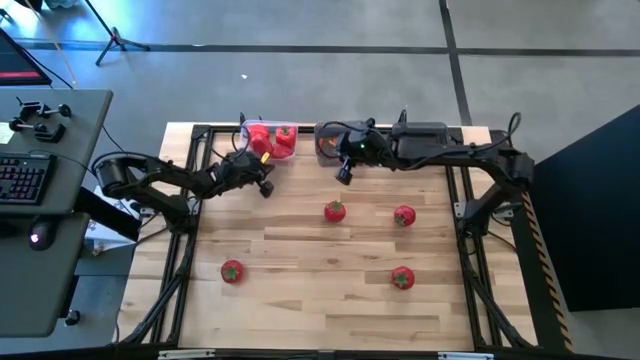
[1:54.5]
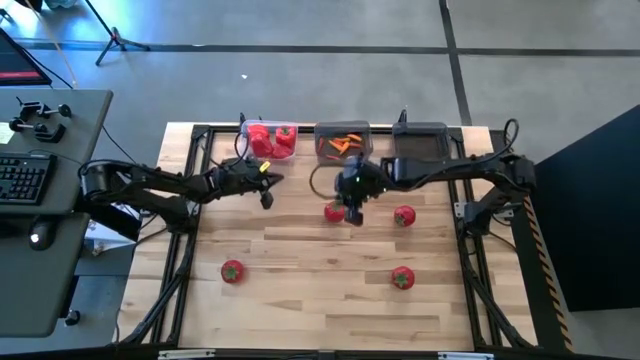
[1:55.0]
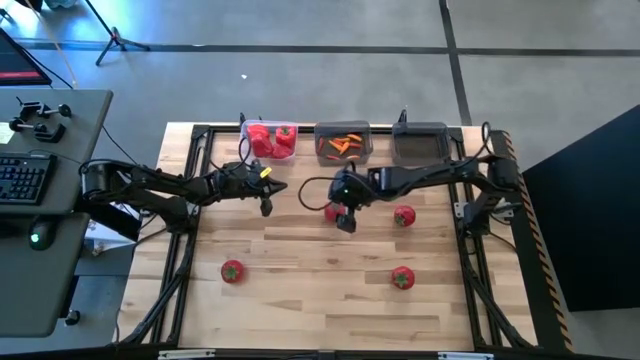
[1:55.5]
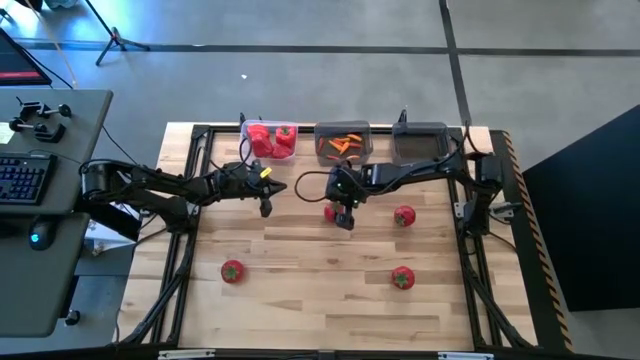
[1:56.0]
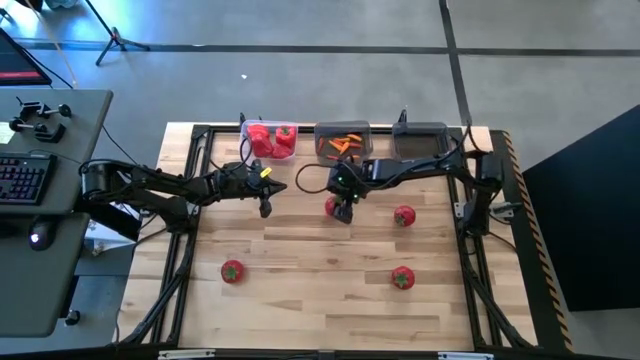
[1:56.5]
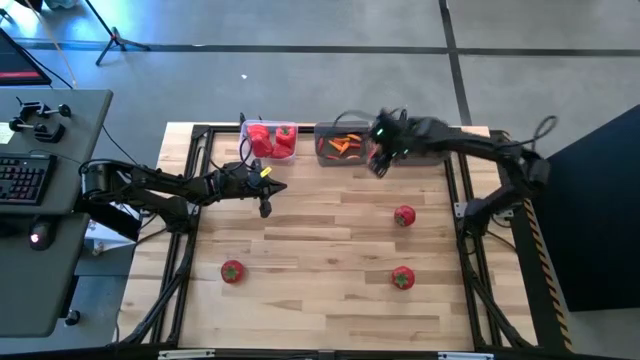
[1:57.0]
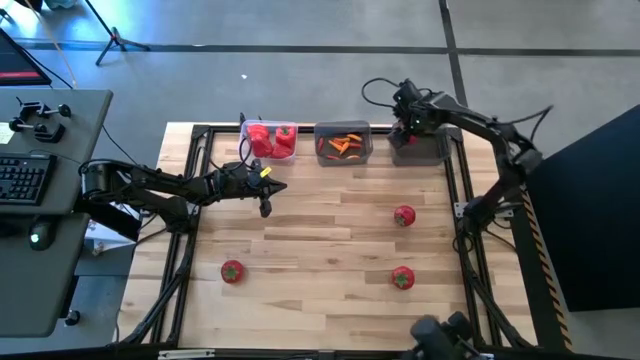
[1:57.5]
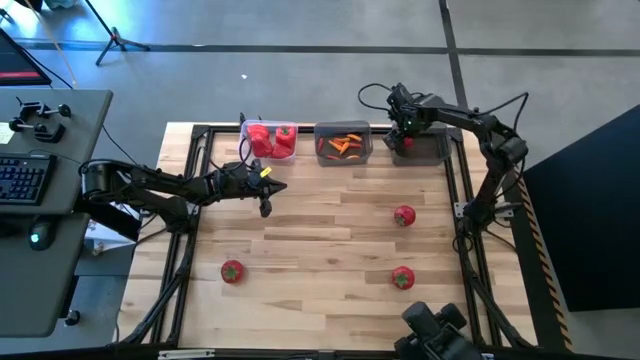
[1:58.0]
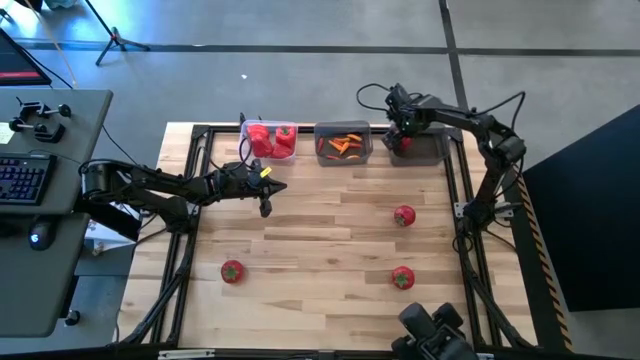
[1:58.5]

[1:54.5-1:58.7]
Task: Sort produce into baskets
Put the red tomato into the right black bin

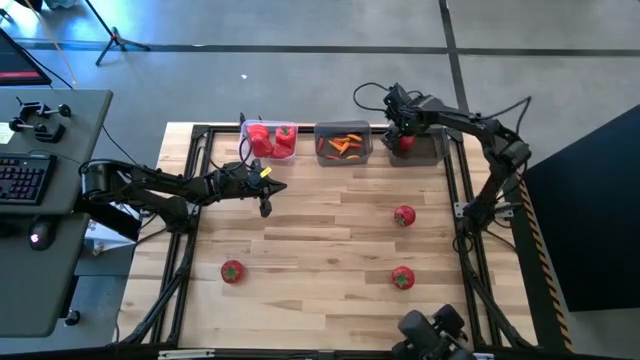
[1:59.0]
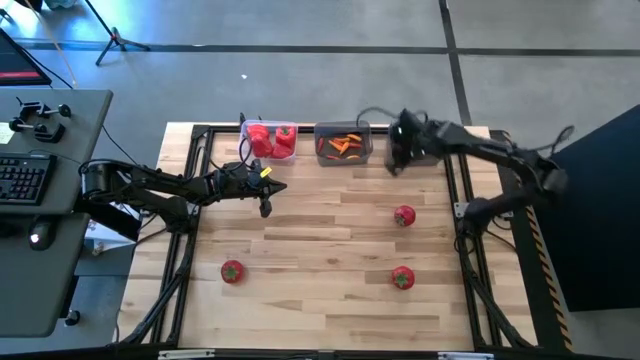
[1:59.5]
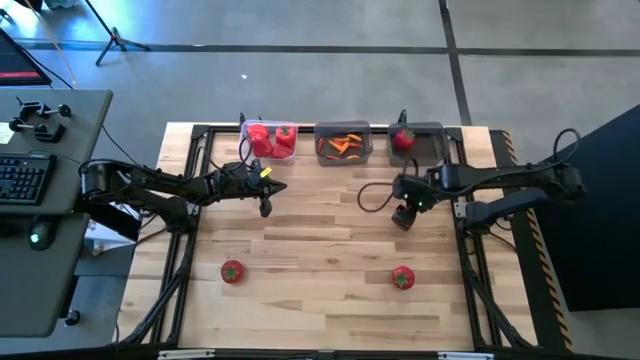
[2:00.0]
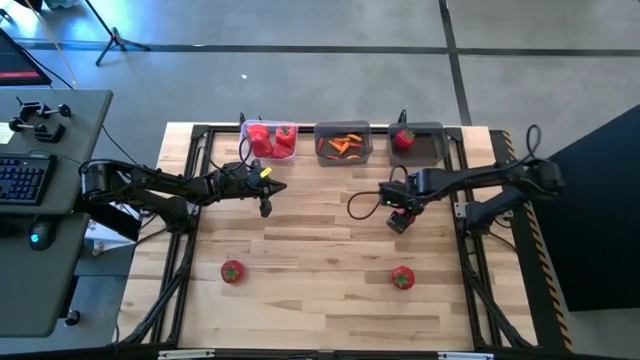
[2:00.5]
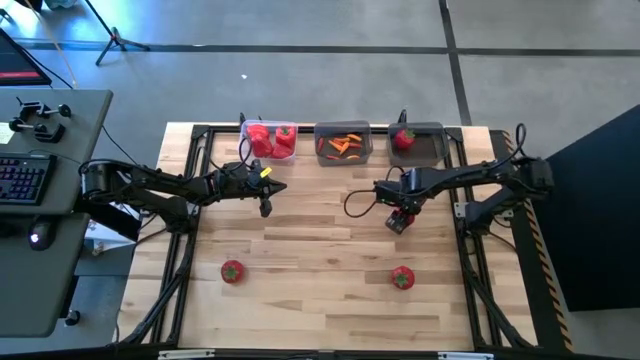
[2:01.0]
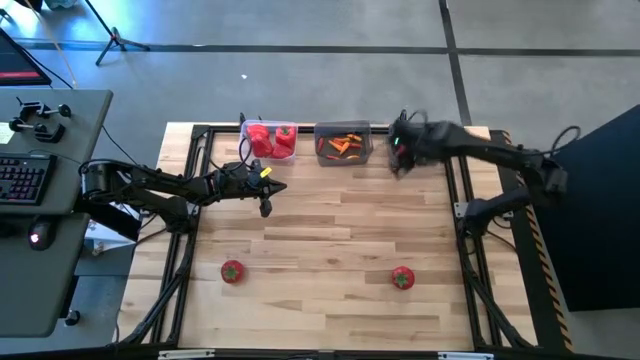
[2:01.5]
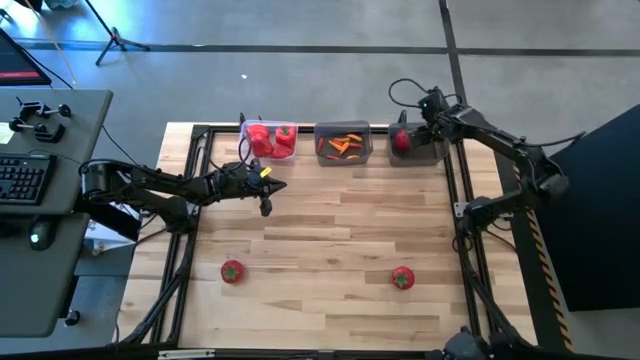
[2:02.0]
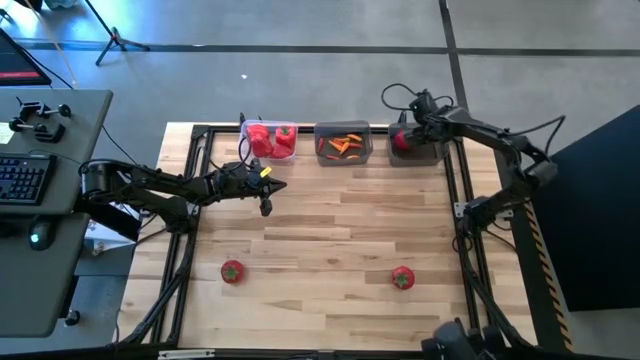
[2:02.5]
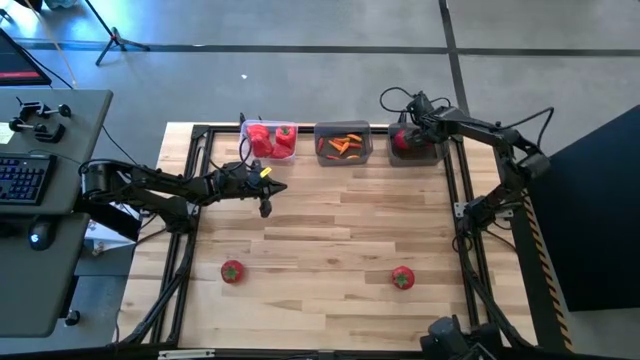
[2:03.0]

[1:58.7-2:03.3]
Put the red tomato into the right black bin

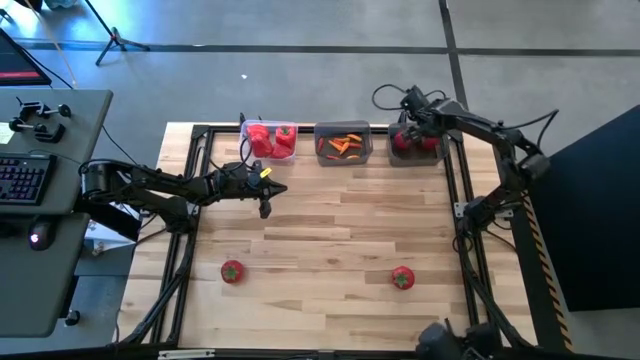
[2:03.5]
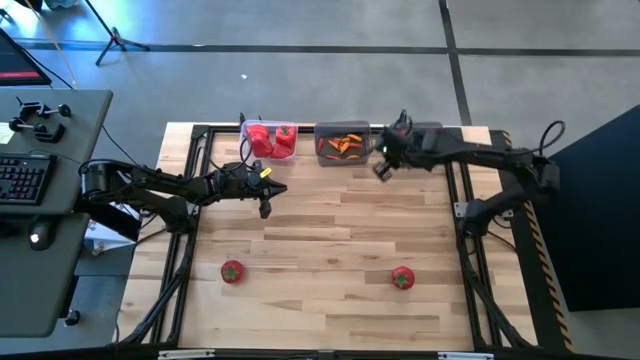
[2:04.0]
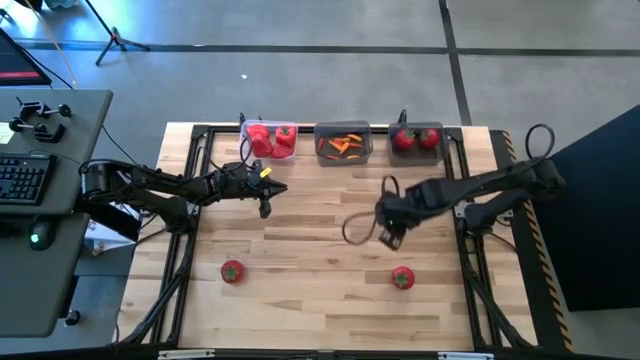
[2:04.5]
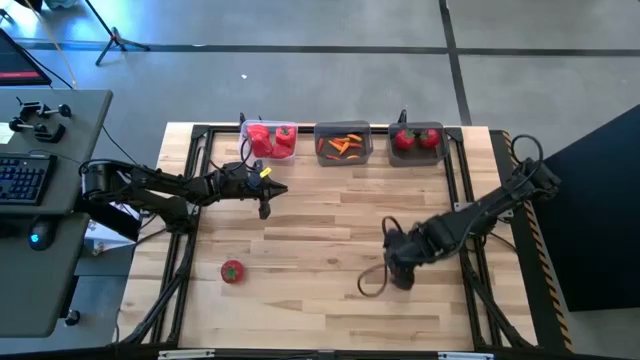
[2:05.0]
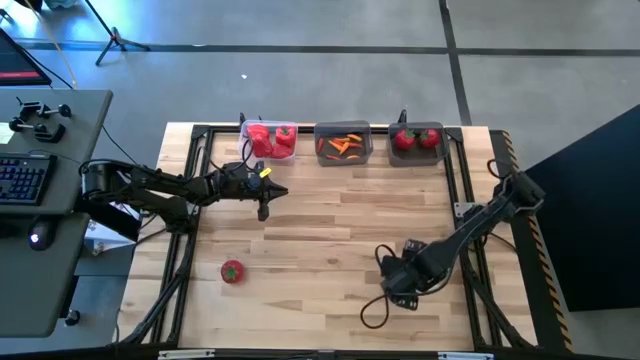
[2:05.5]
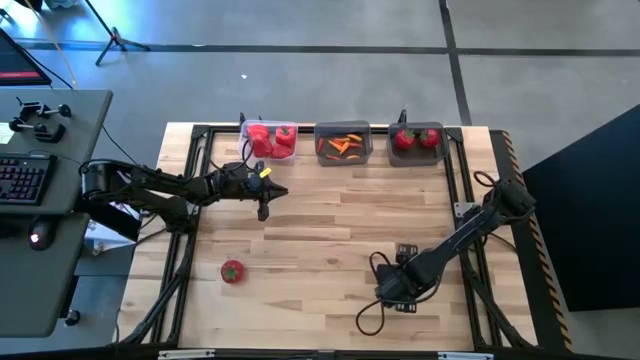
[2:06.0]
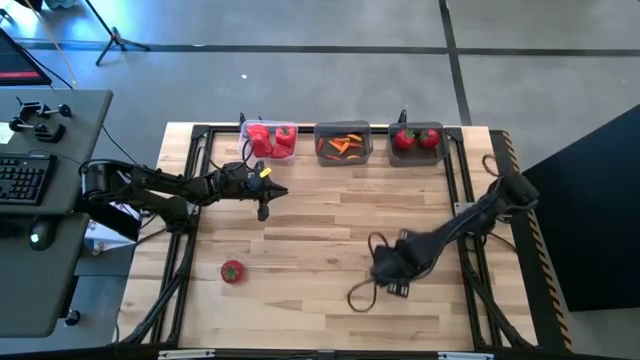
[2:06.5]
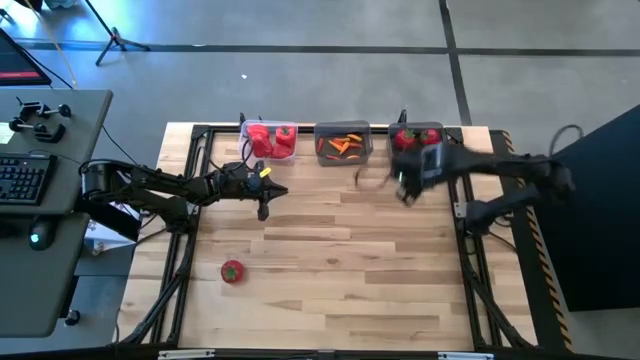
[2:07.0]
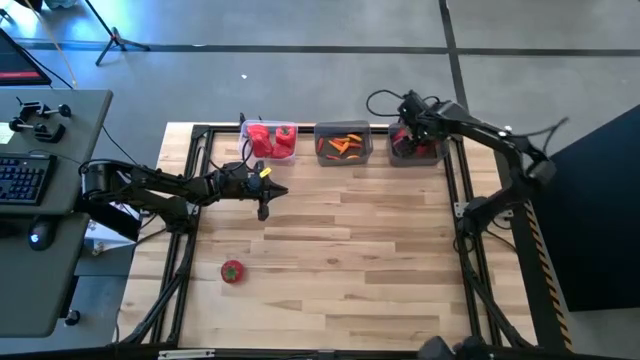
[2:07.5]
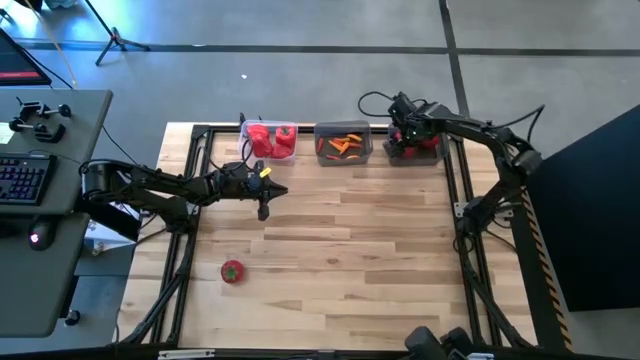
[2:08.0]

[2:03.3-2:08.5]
Put the red tomato into the right black bin

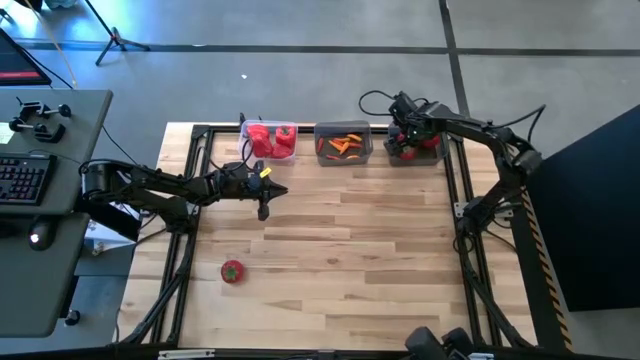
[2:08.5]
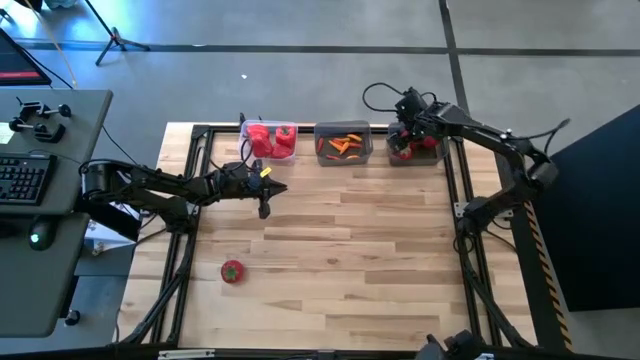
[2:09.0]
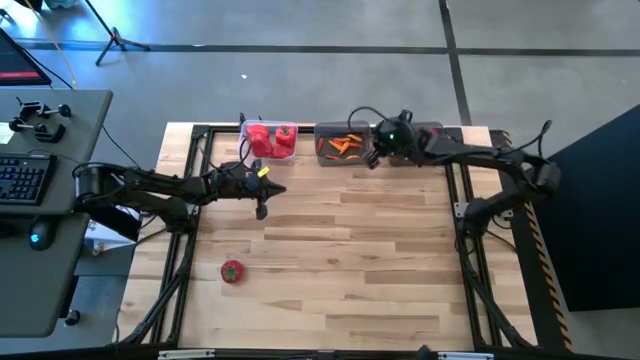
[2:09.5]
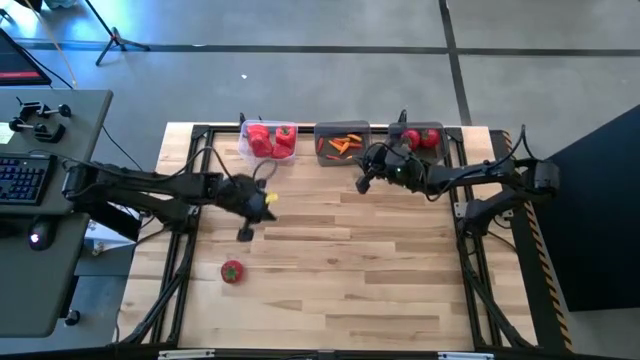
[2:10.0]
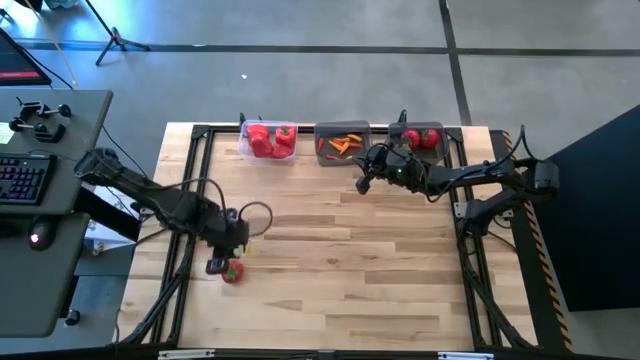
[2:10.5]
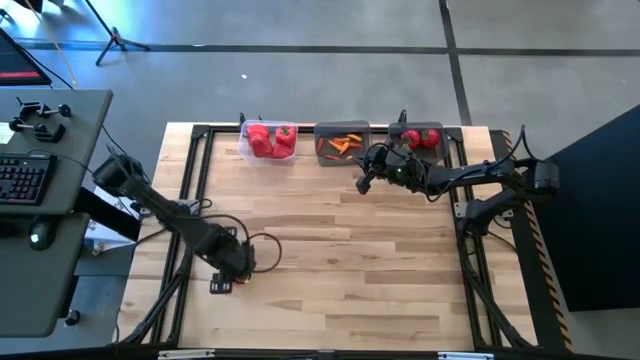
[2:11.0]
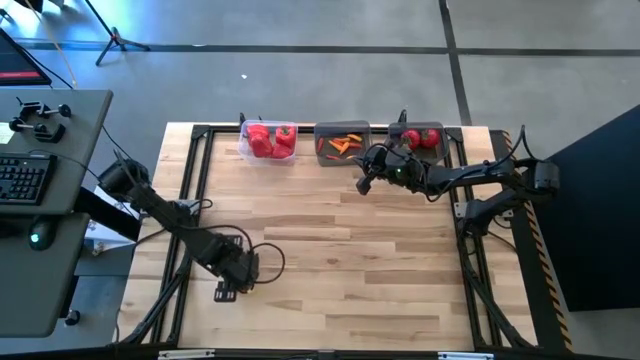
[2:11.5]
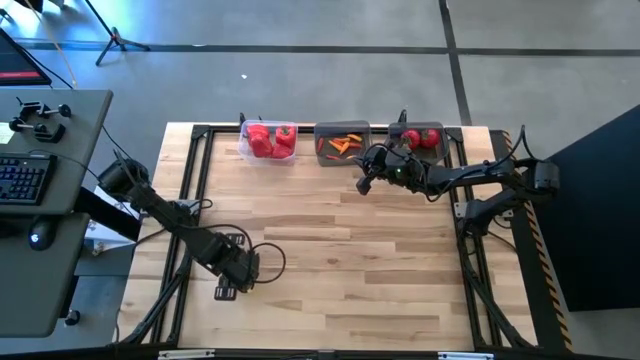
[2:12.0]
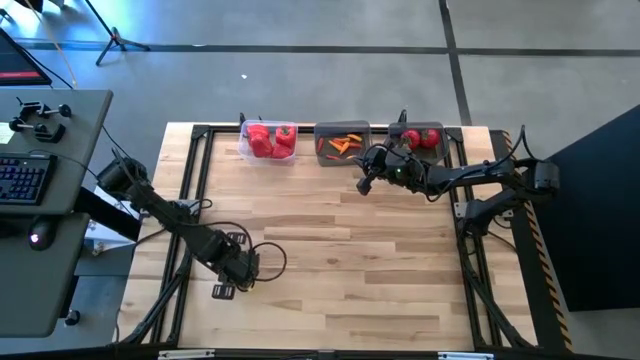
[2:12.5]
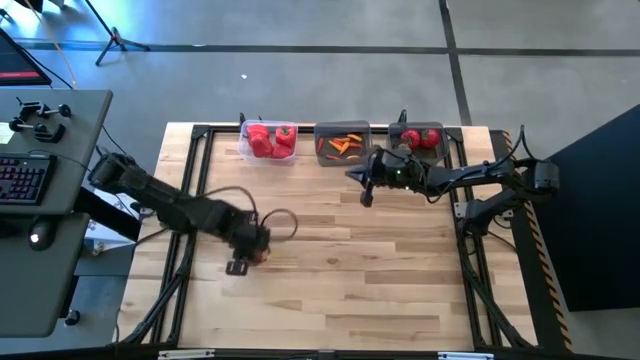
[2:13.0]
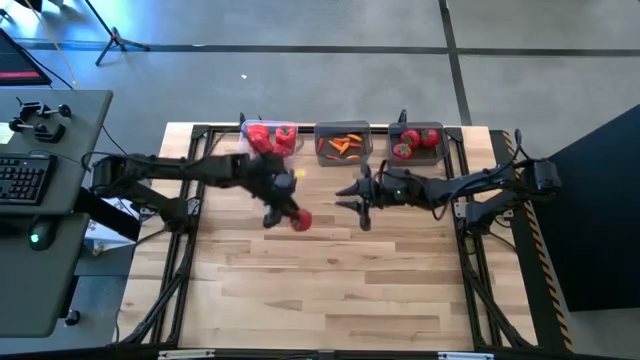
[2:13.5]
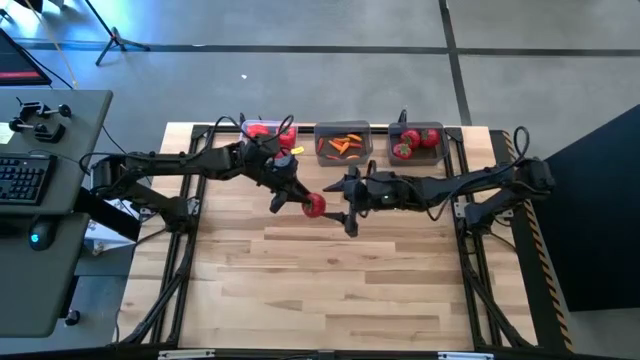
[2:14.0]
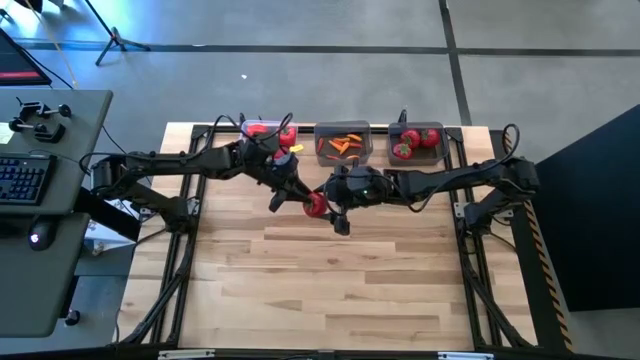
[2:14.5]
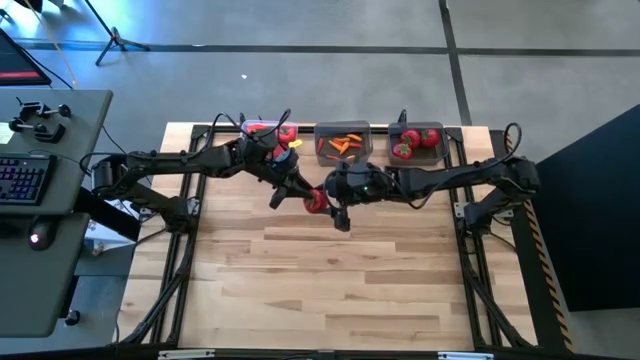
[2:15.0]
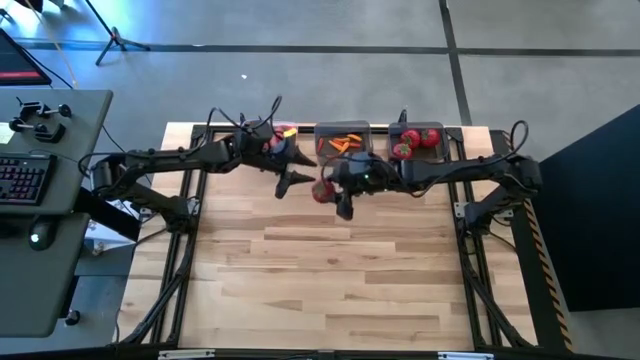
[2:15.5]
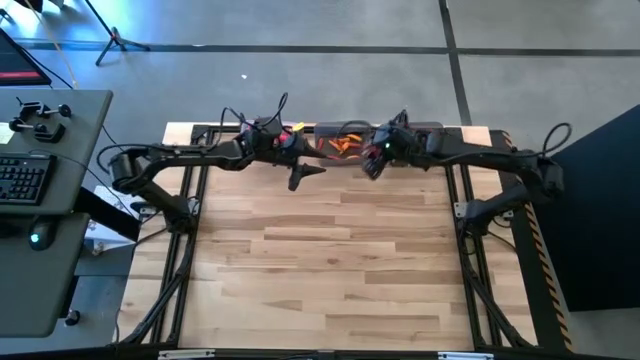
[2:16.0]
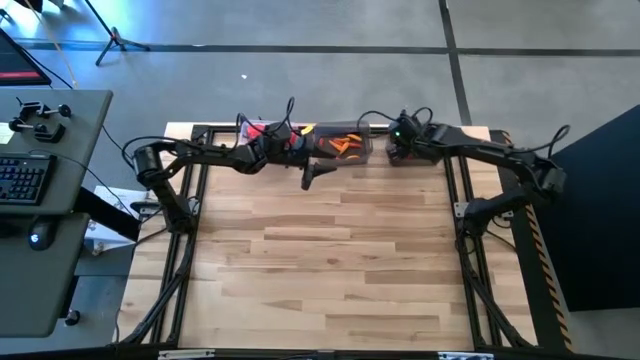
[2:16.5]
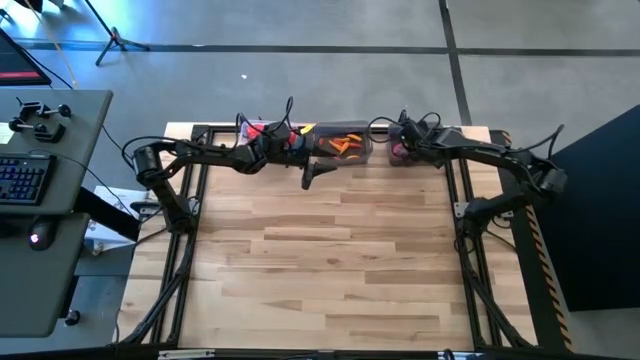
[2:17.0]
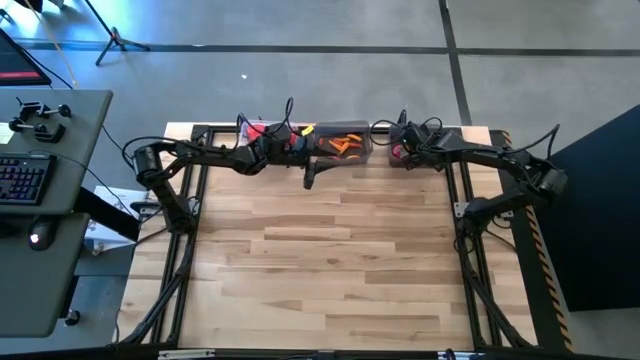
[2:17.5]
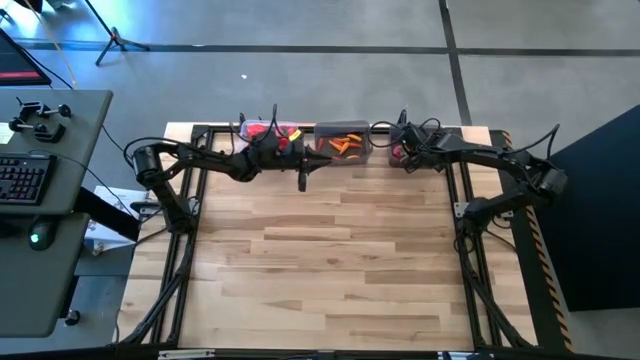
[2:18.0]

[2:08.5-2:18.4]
Put the red tomato into the right black bin
